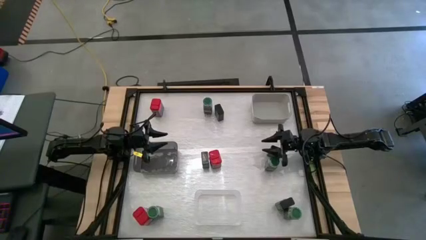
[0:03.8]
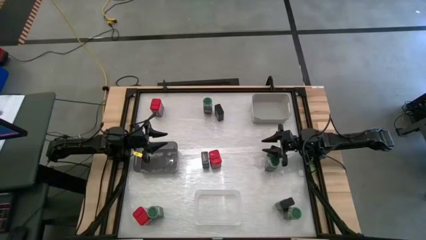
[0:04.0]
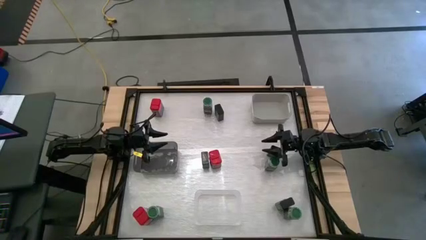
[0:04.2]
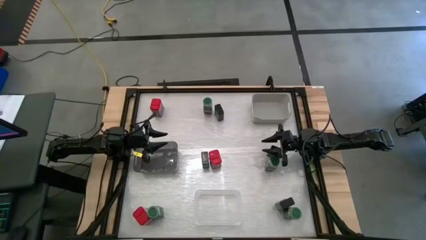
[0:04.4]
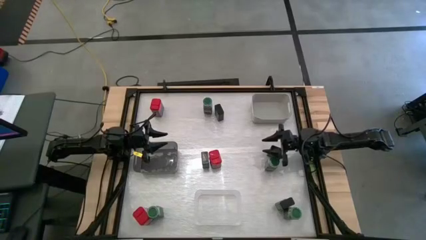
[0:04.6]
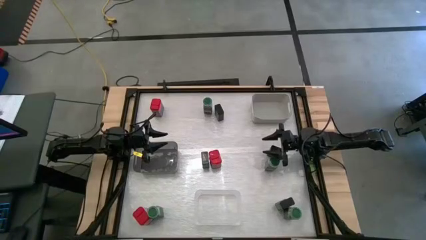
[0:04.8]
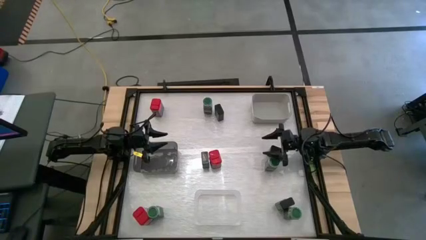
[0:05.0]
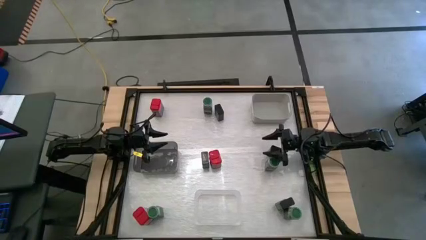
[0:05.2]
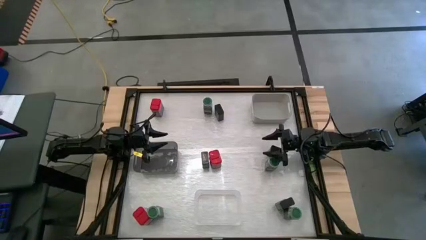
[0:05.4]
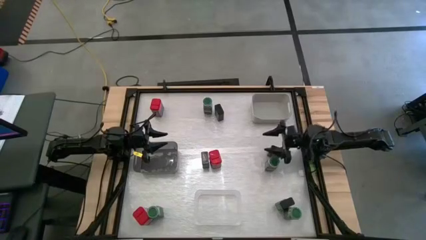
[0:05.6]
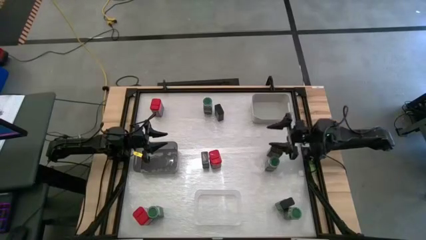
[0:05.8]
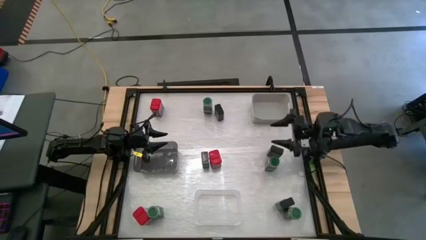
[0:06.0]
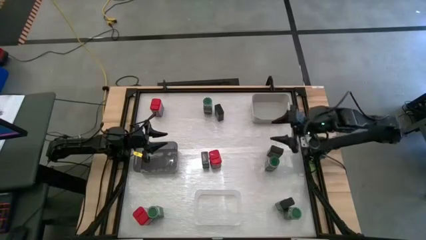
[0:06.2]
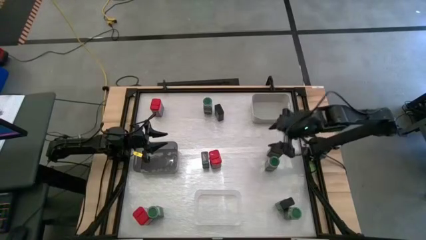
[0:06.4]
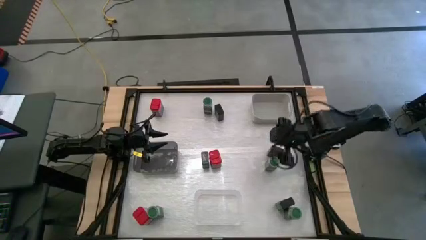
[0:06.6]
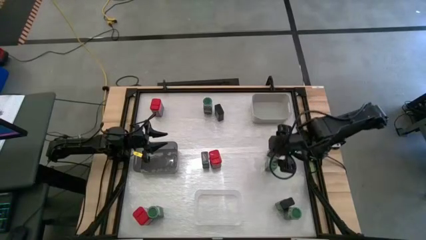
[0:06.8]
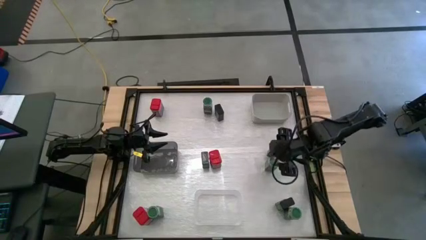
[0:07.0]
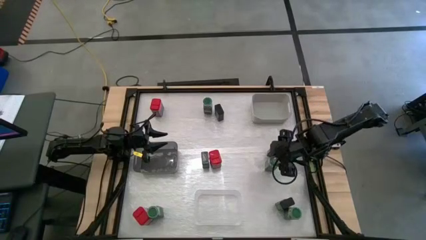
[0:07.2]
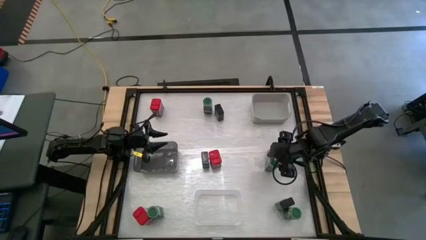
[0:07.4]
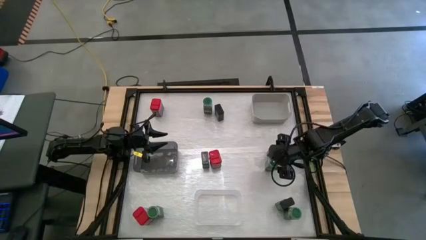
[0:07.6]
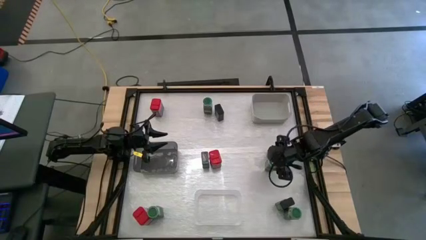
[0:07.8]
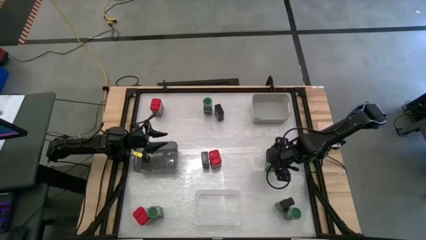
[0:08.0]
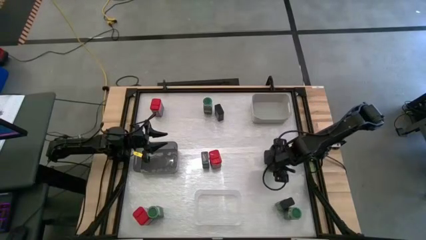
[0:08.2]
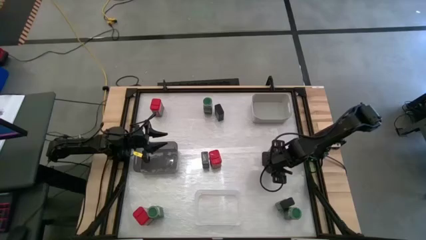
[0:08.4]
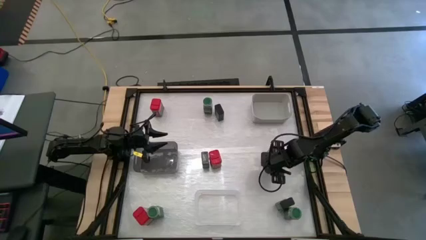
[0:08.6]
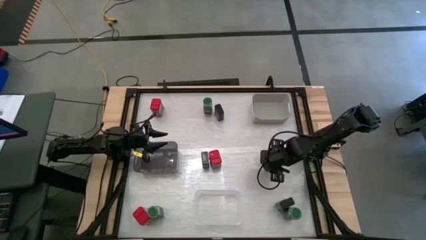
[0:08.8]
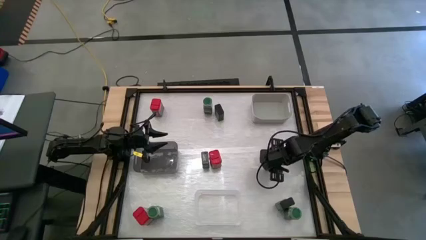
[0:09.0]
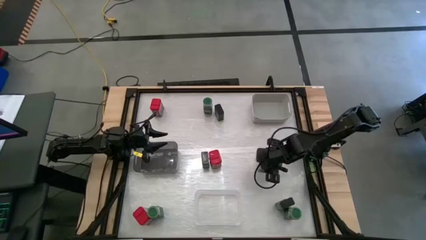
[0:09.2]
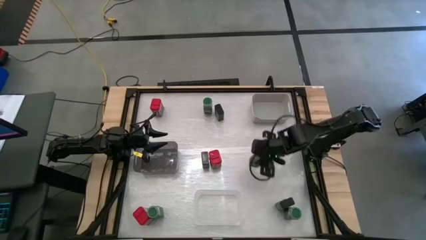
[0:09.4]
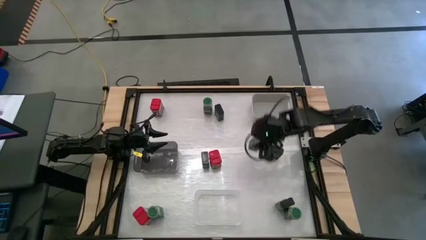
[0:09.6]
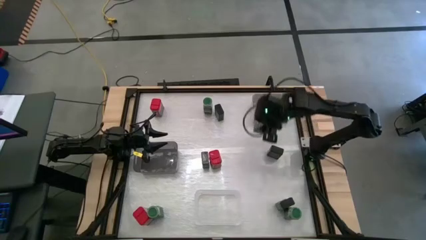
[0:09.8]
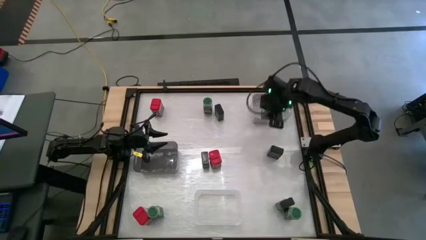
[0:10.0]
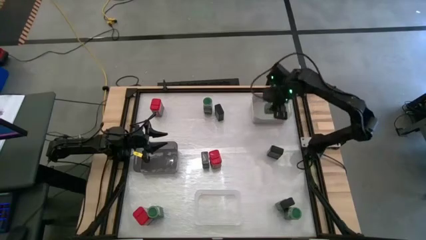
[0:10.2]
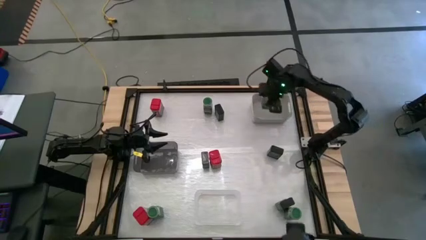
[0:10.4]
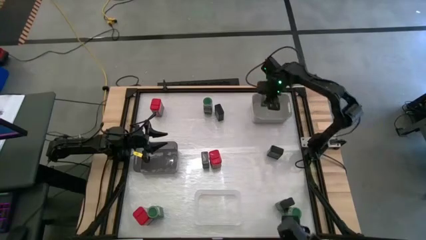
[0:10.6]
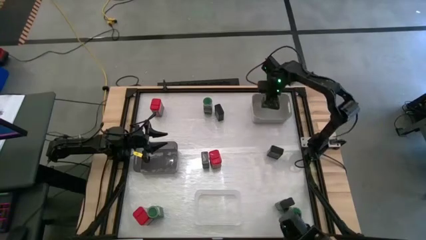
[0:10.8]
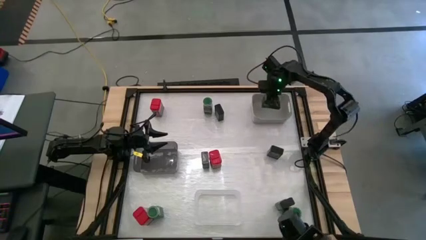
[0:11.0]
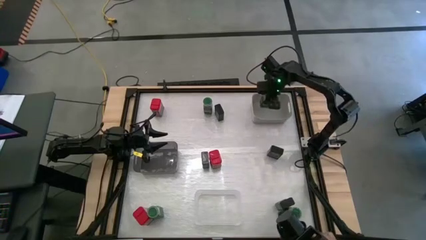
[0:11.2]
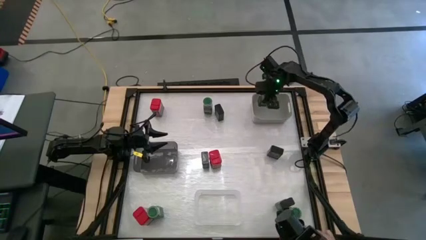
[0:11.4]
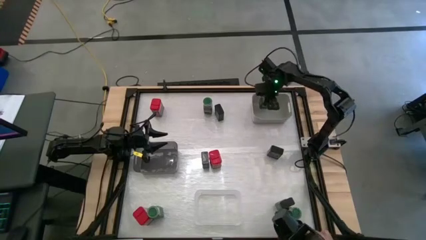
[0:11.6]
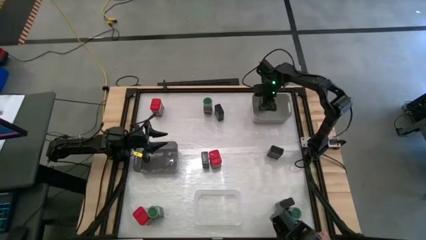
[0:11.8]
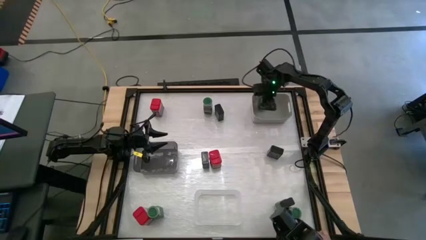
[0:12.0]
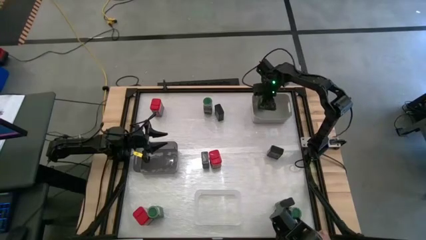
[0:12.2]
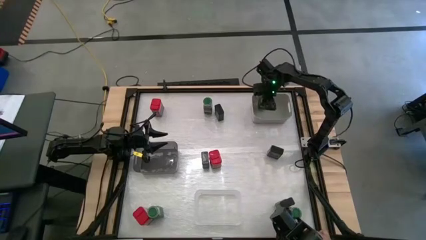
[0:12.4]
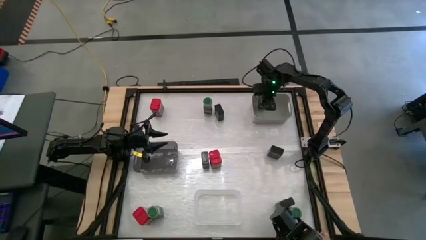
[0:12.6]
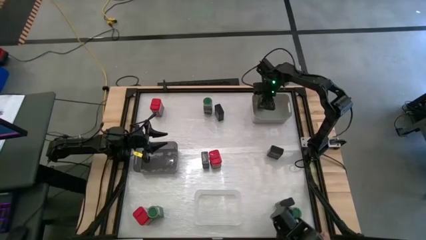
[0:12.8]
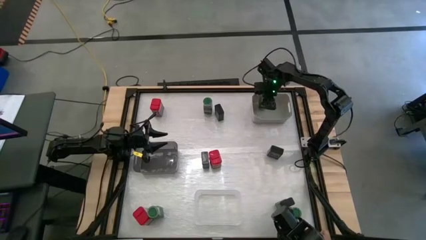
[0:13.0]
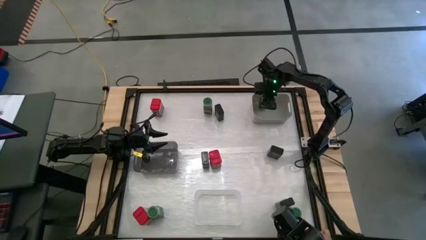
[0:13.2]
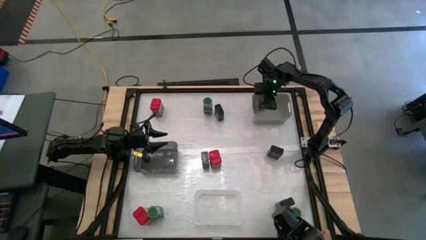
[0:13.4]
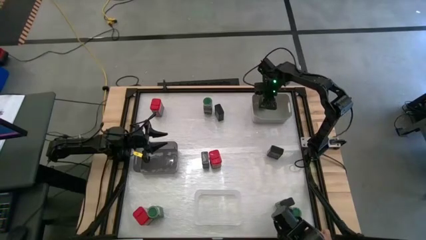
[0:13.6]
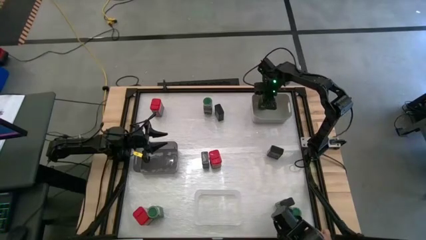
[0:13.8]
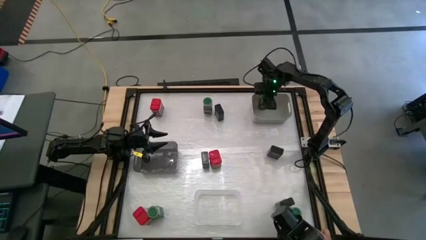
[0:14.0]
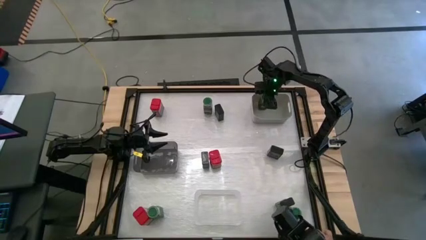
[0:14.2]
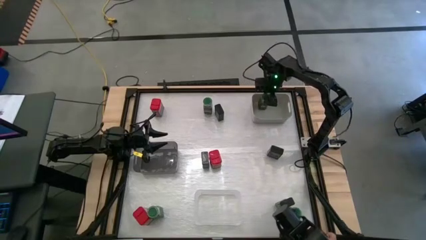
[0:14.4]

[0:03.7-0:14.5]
Task: Sort spices by type
Put the middle right Green seasoning into the grey bin

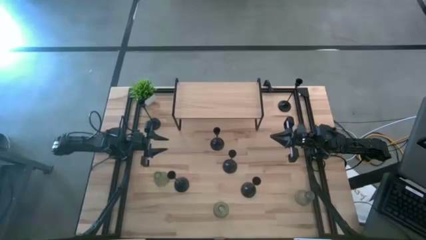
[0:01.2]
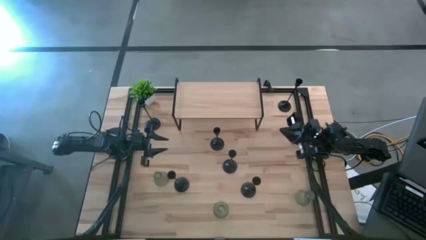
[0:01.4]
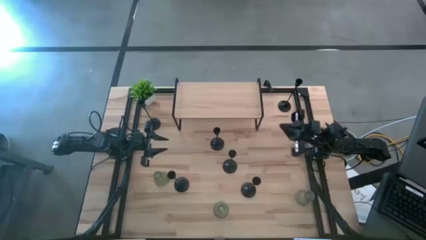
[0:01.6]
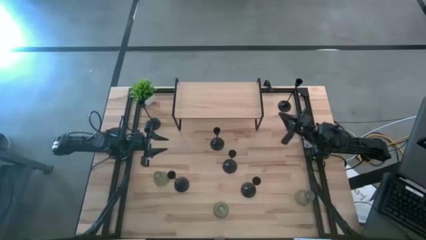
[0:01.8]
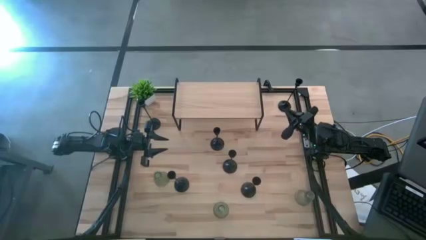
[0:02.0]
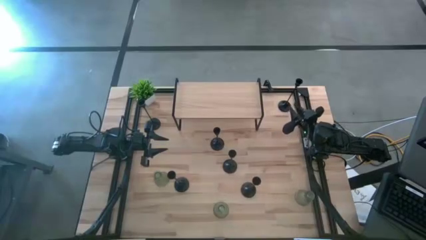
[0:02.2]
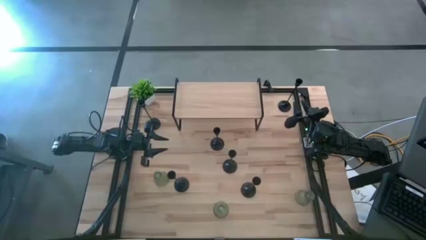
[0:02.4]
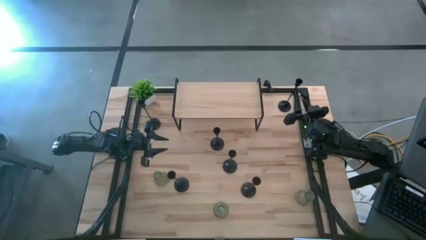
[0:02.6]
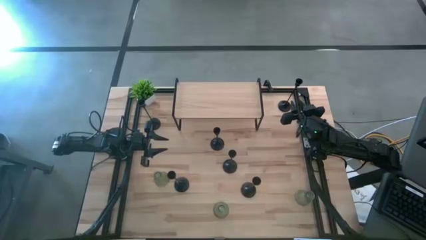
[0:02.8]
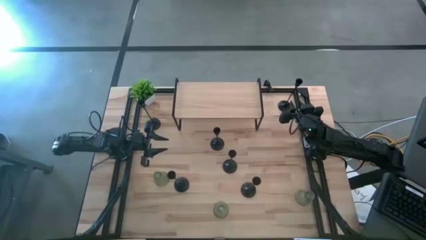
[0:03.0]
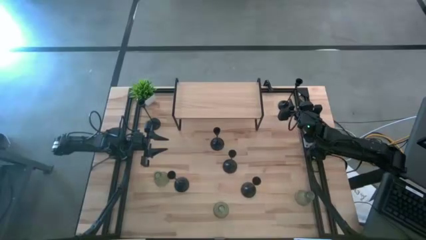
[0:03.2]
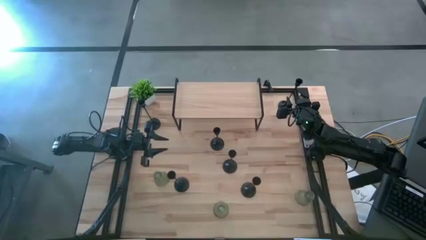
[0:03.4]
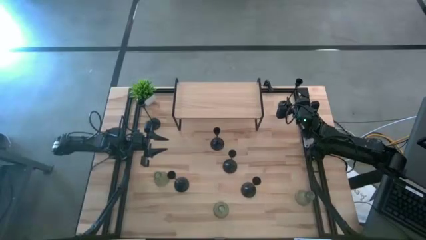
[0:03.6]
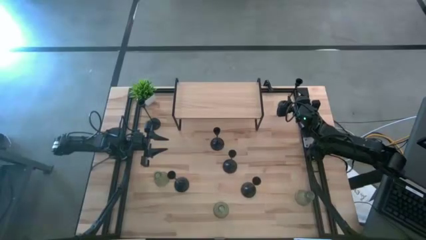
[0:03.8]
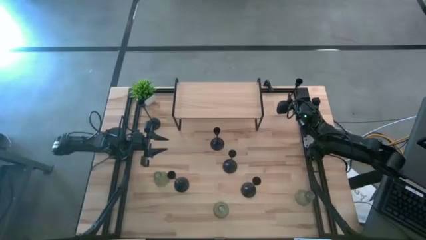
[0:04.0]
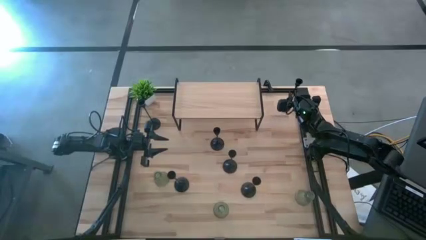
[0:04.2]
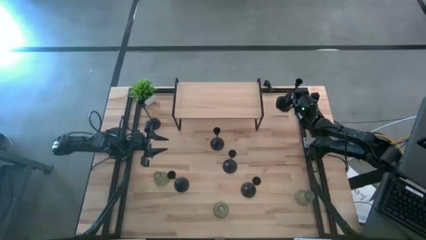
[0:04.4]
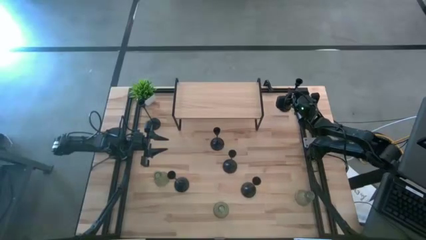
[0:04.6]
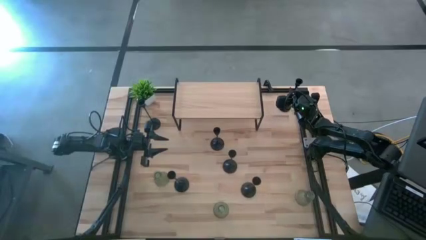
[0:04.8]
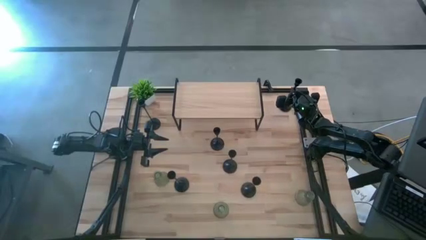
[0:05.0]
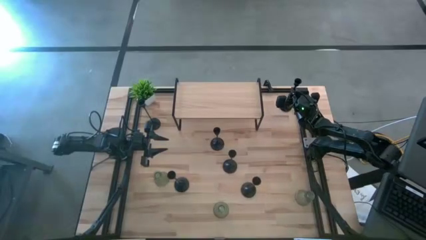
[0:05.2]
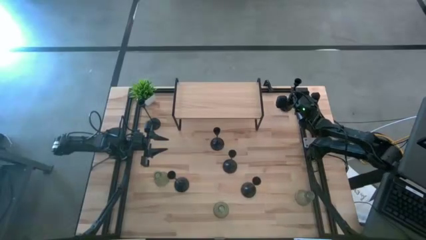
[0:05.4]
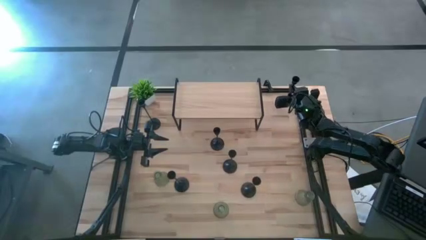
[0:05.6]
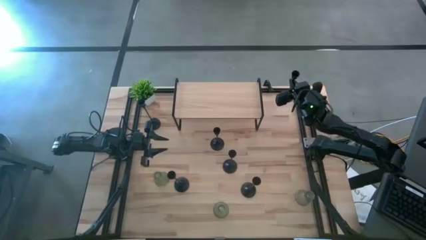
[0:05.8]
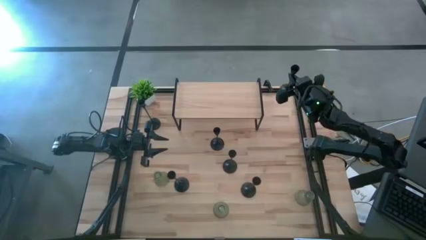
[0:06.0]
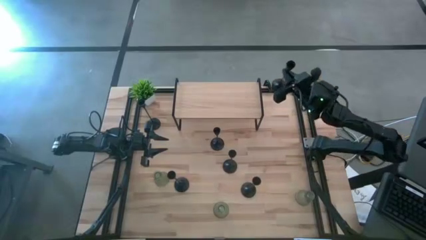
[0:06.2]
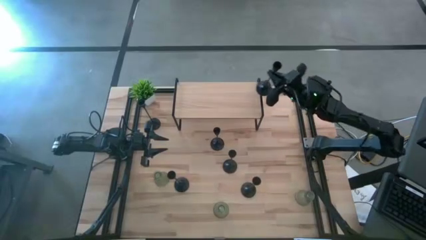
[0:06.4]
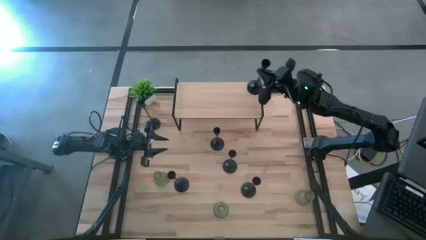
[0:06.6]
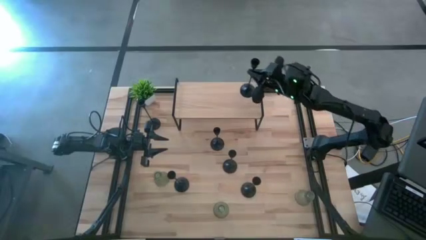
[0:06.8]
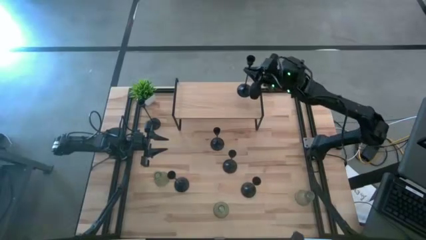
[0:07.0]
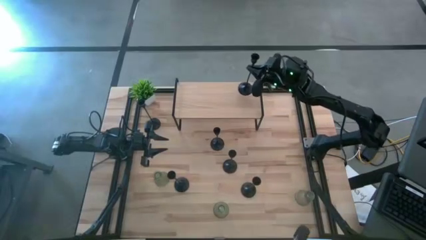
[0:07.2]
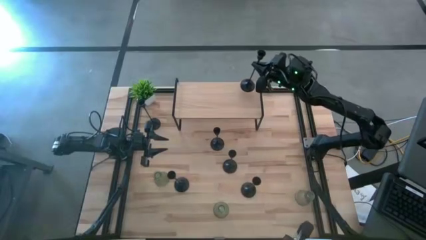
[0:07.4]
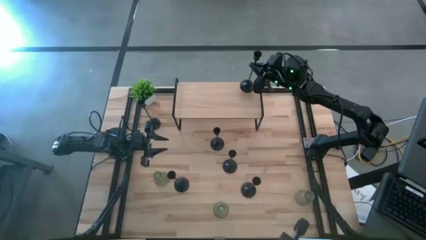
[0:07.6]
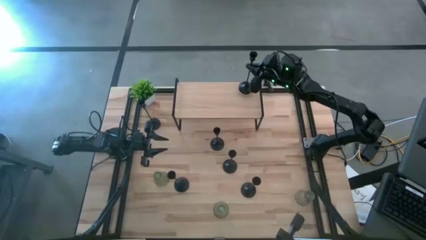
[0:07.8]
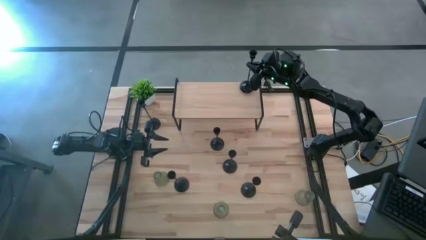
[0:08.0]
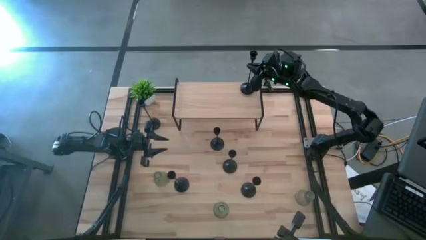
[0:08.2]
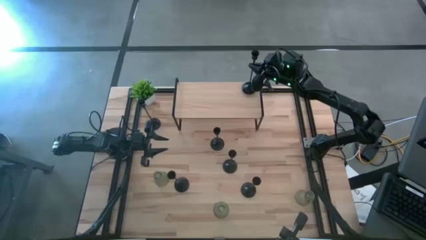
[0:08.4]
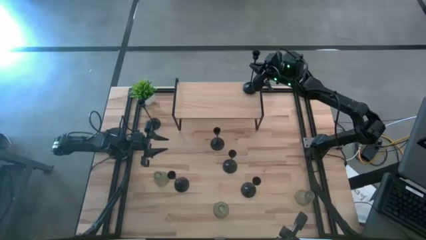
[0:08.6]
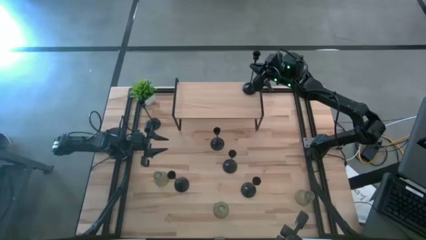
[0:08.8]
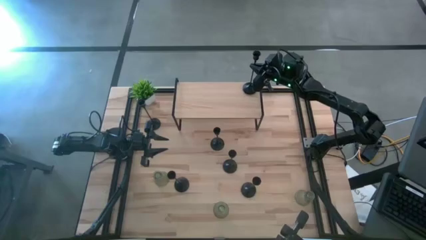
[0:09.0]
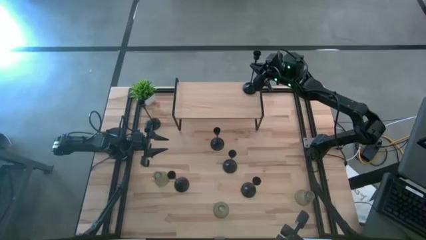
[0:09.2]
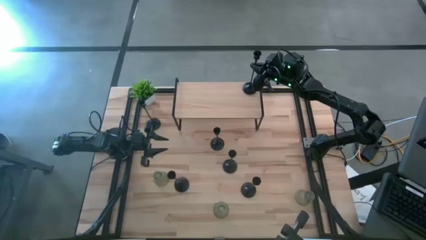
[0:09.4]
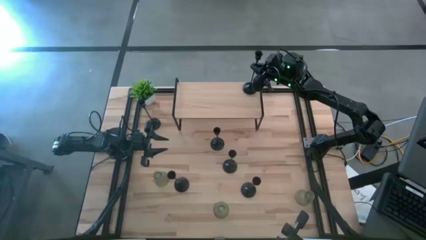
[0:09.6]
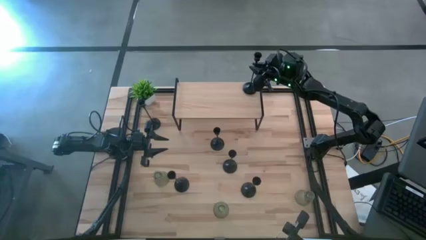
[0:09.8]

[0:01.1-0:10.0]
Task: Pick & Place candle stick holders
Put the black candle holder on the shelf
